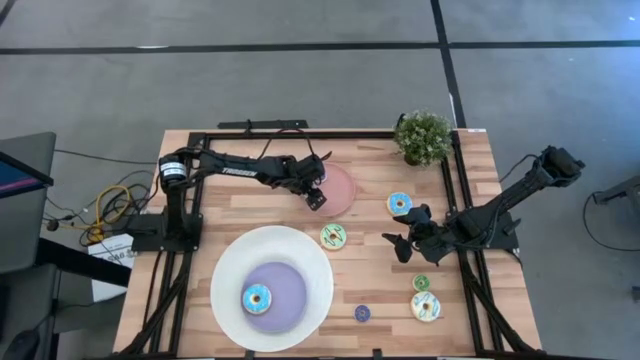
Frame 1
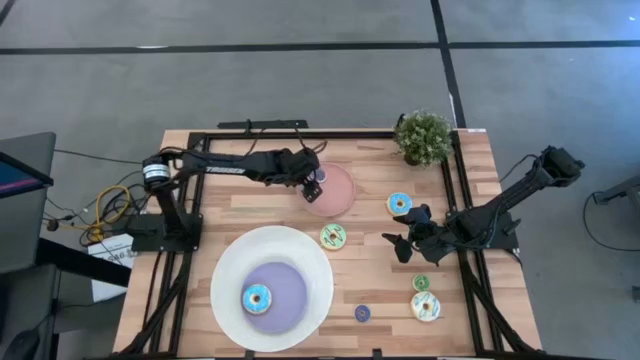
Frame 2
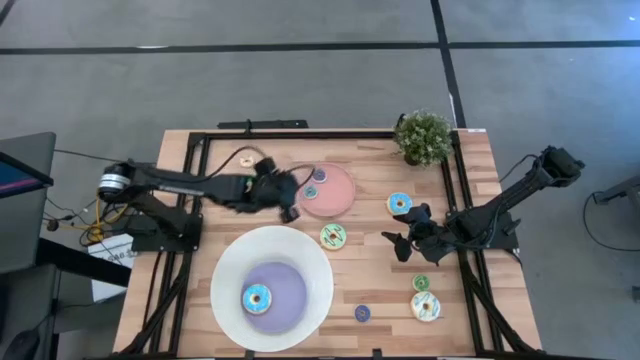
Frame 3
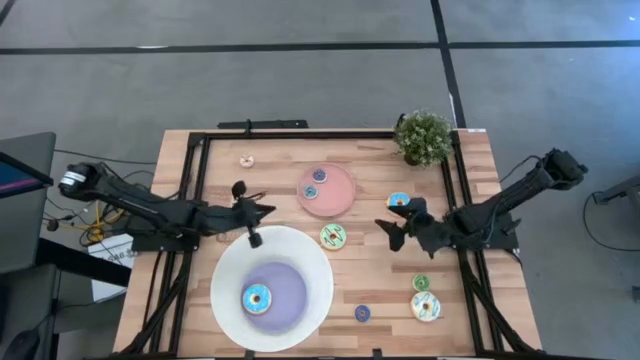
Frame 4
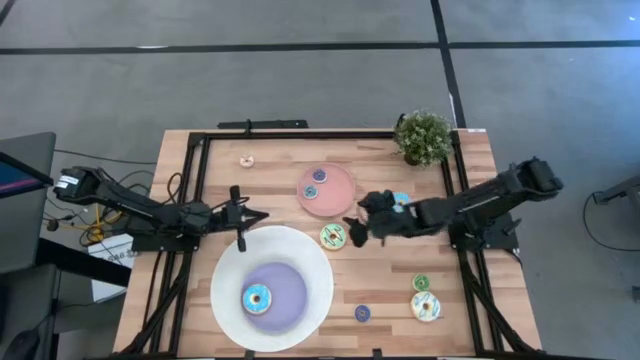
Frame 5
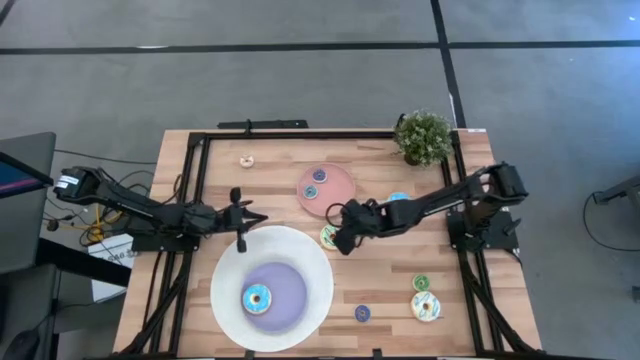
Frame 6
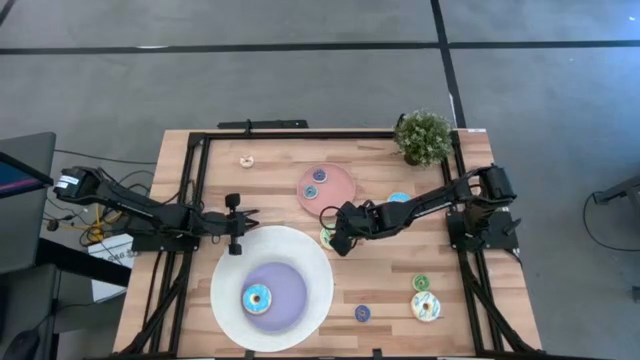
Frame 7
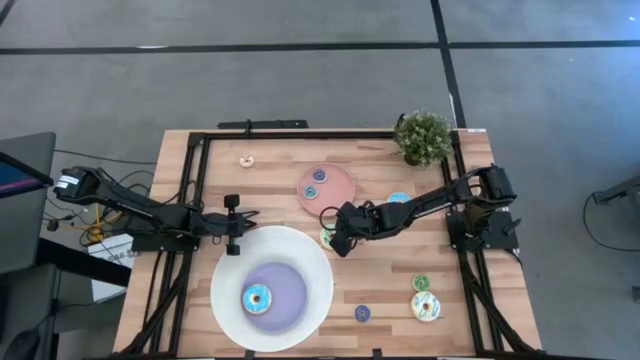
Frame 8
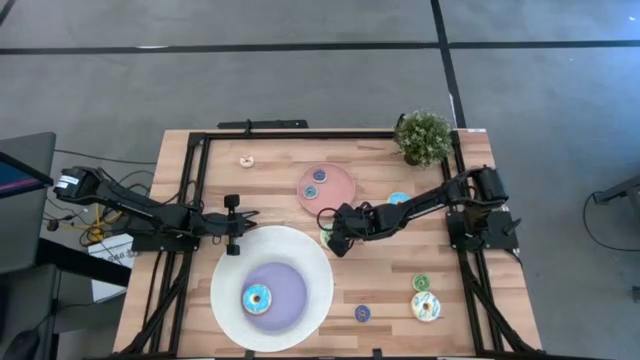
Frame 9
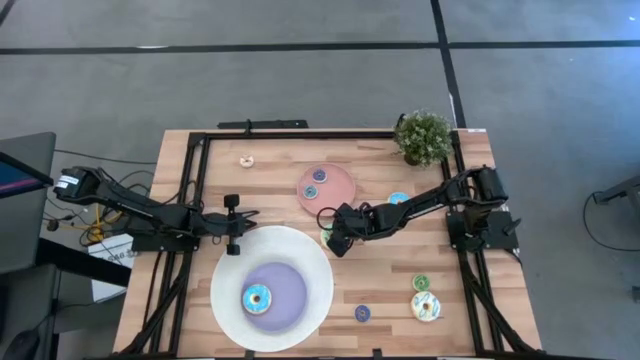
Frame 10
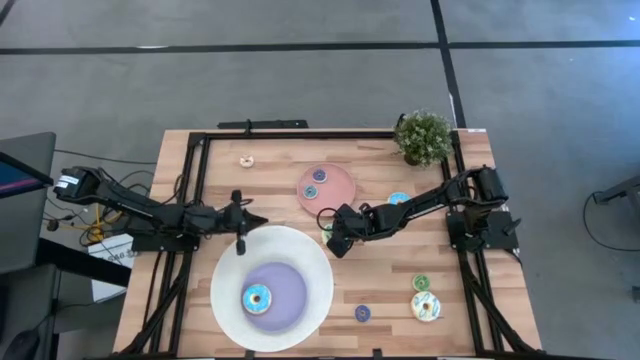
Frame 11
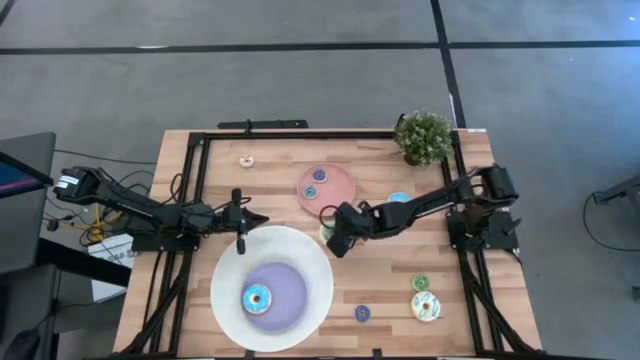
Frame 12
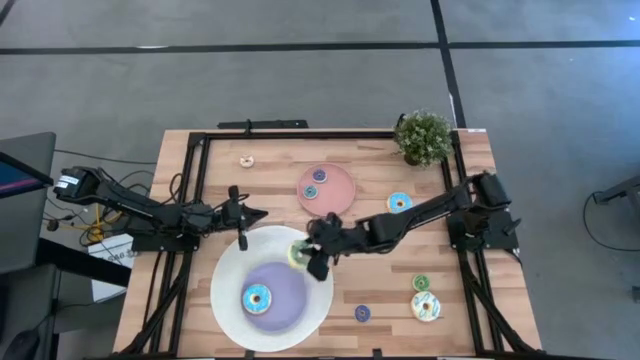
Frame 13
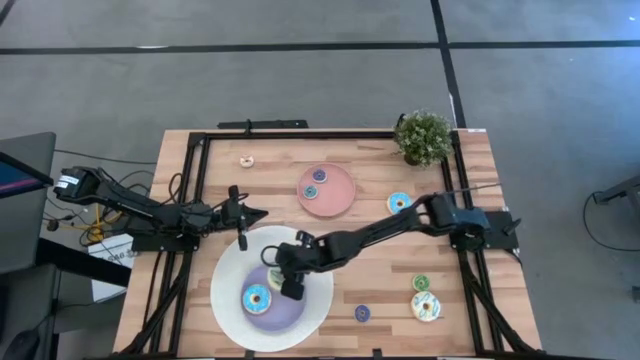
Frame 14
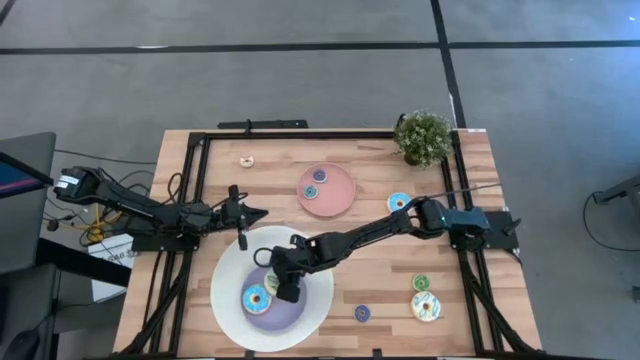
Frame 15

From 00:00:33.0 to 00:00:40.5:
Task: Pick & Place donuts
Put the big light green donut on the purple plate

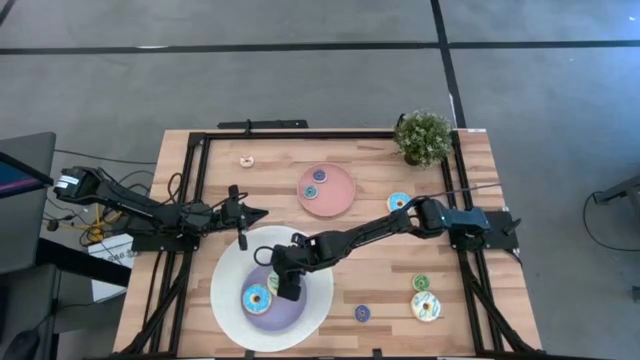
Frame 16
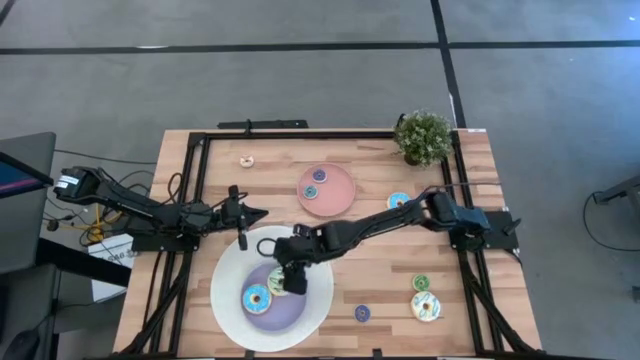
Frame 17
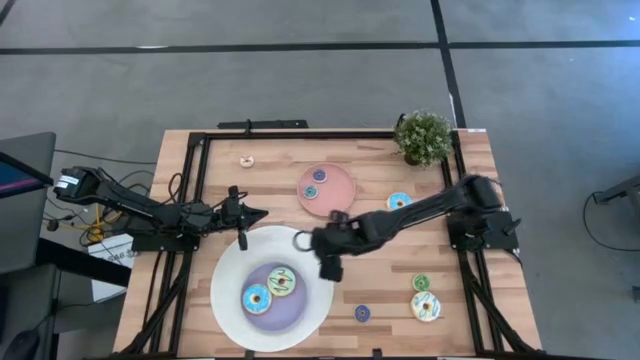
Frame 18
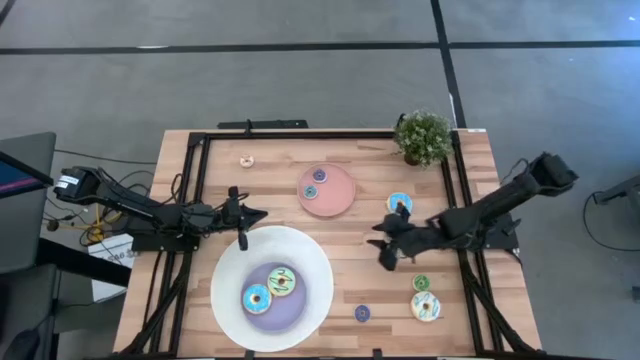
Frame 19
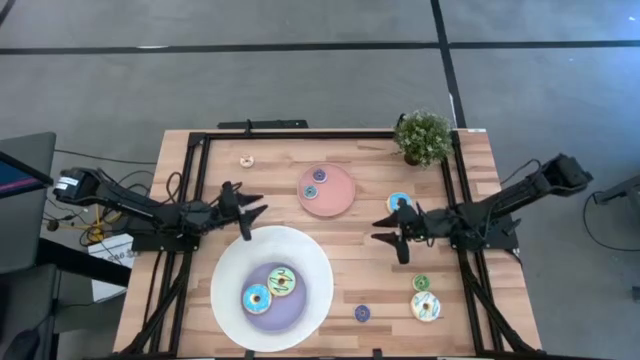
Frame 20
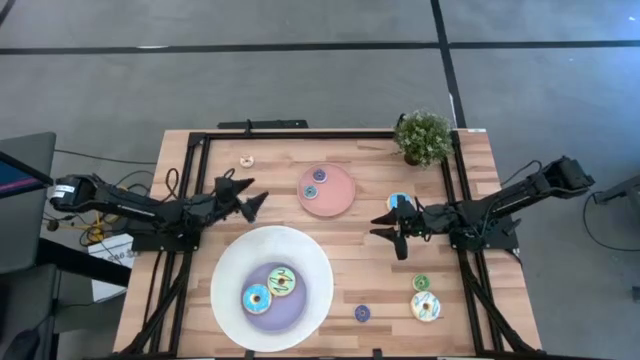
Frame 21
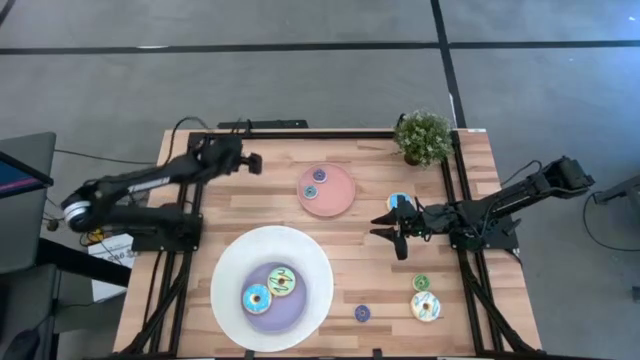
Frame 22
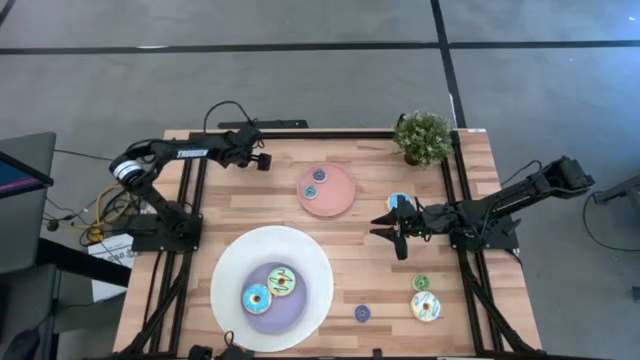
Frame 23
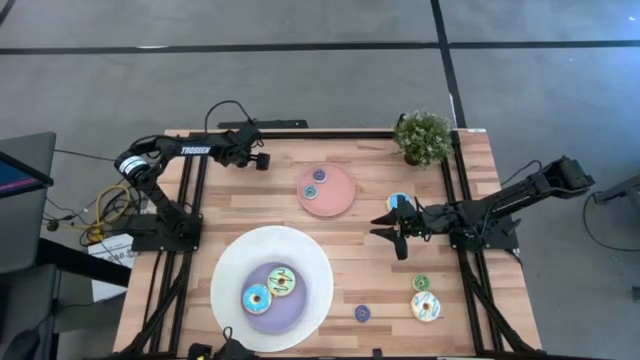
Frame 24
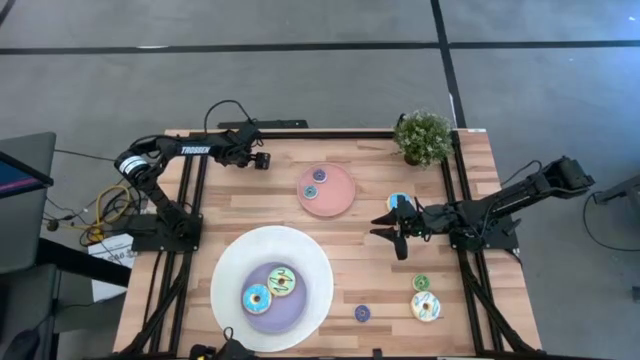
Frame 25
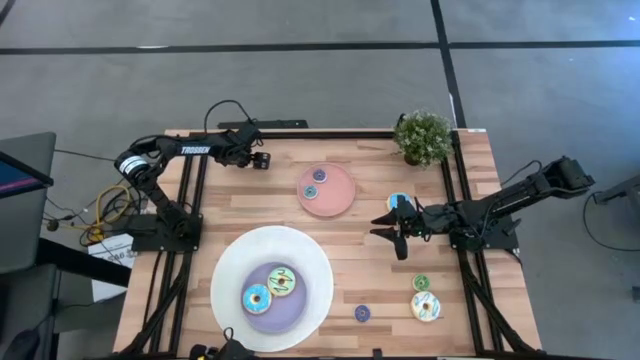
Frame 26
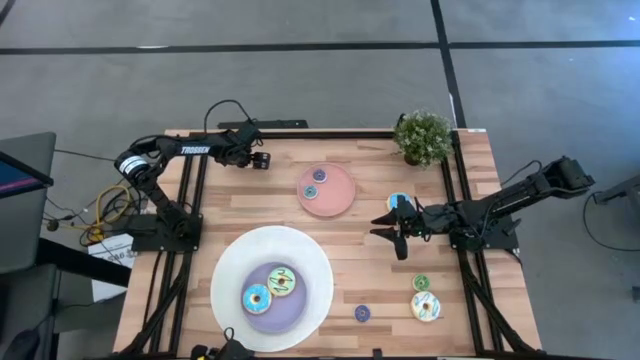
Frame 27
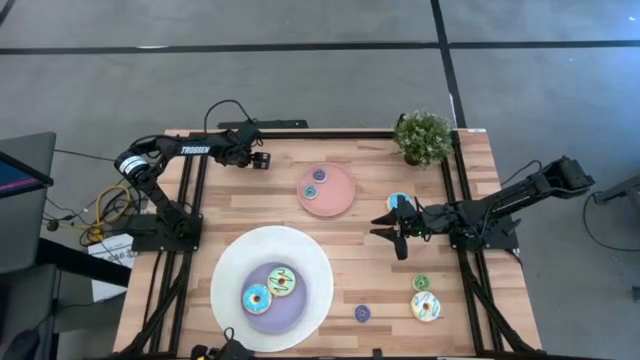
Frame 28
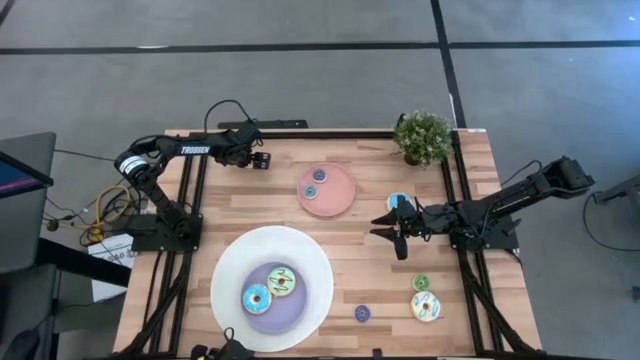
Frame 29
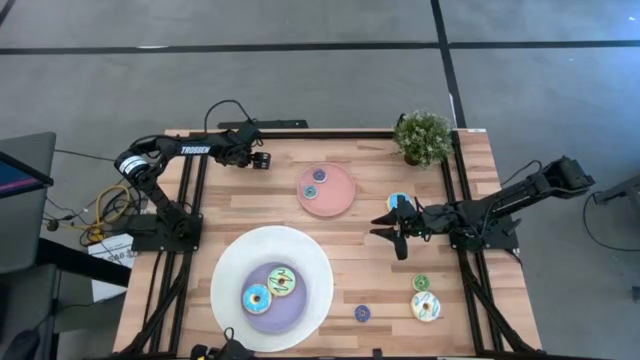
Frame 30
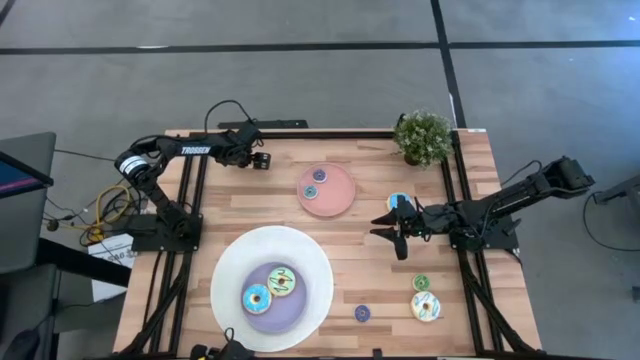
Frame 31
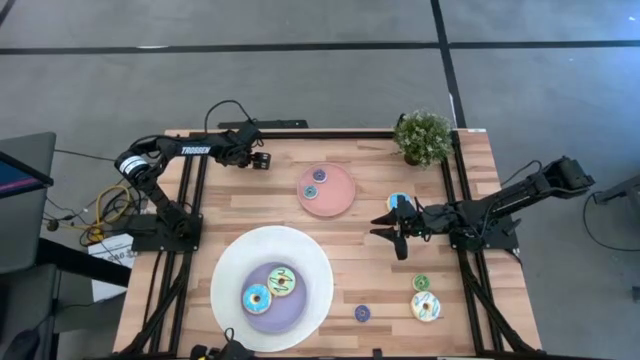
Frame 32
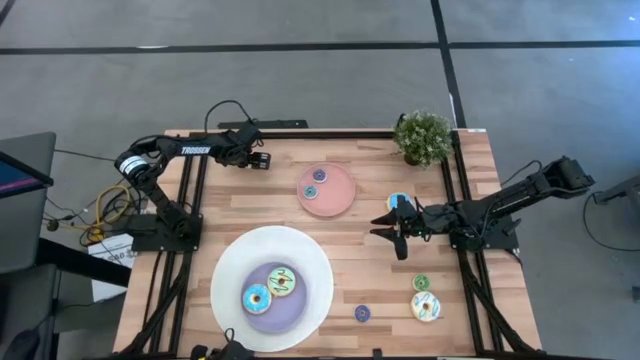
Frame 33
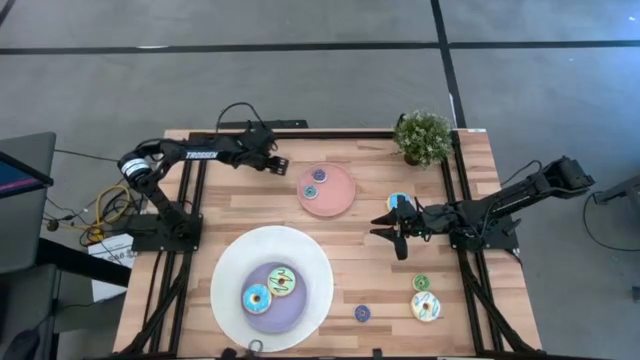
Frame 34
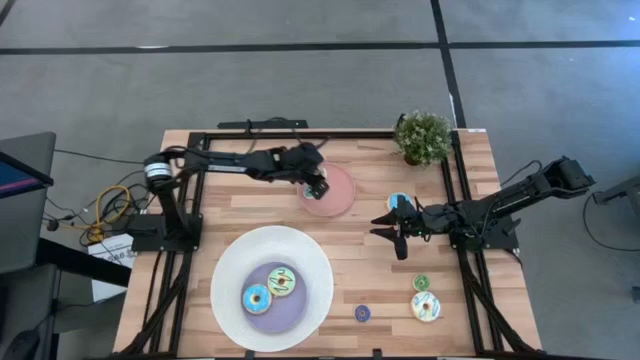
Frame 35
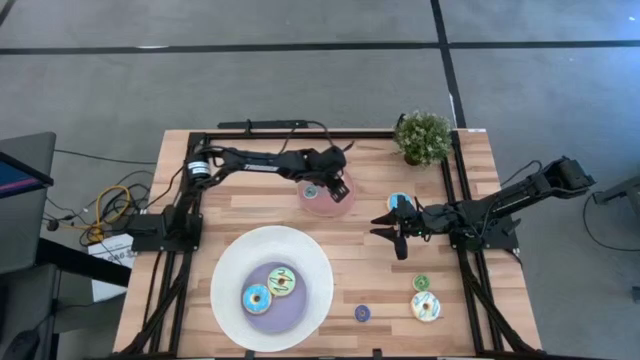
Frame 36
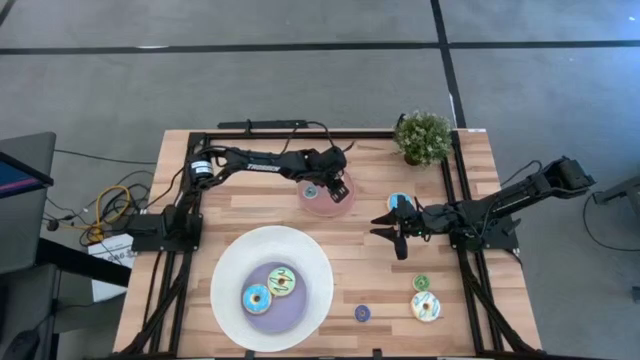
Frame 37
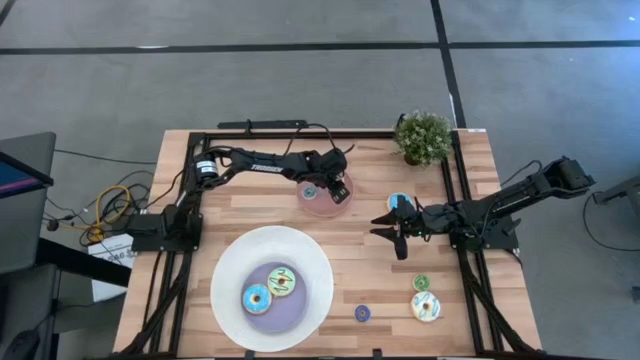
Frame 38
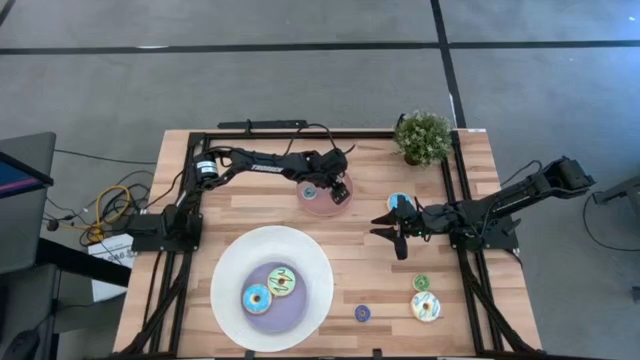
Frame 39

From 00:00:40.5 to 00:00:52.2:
Put the small white donut on the pink plate

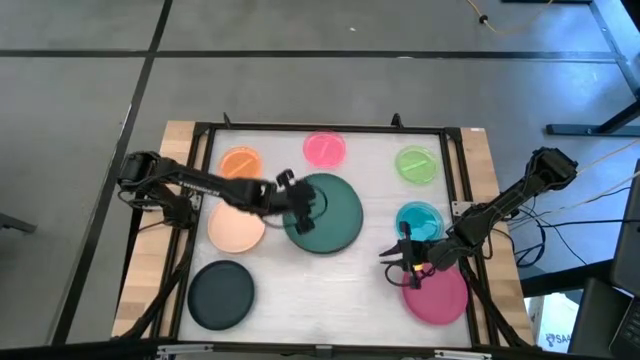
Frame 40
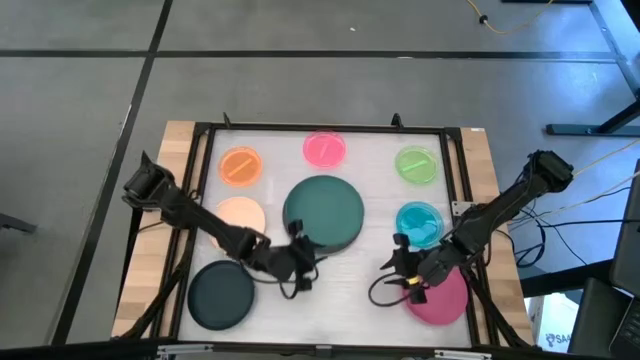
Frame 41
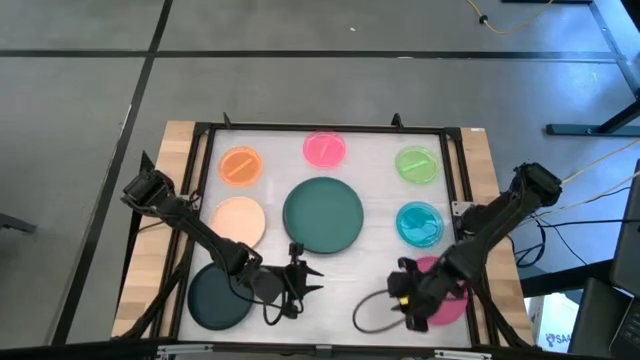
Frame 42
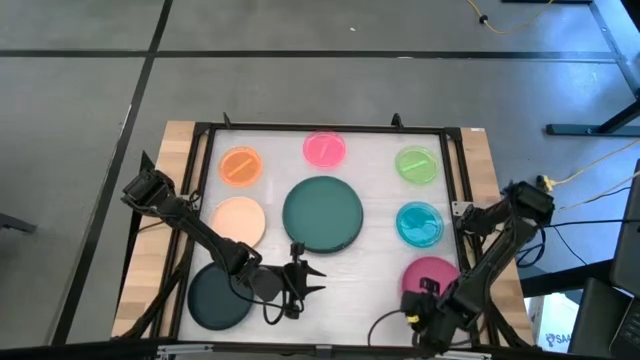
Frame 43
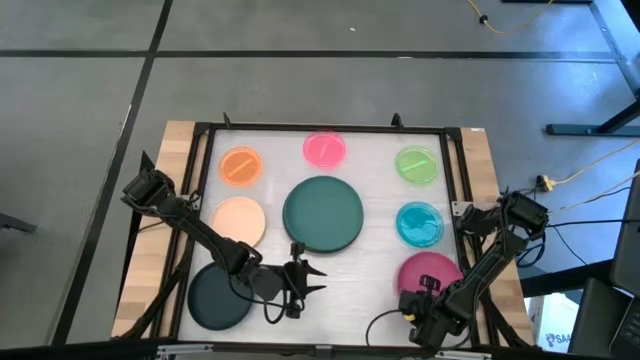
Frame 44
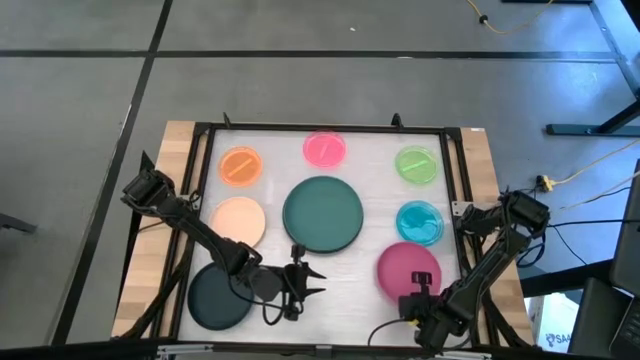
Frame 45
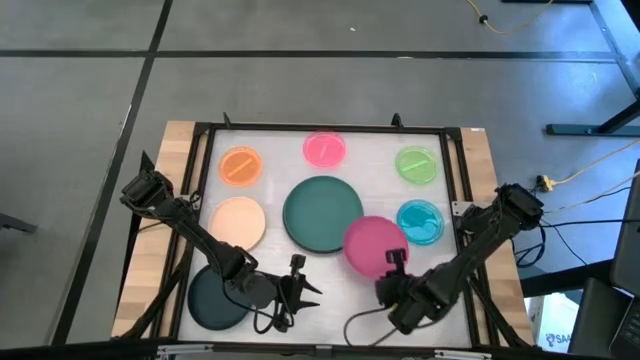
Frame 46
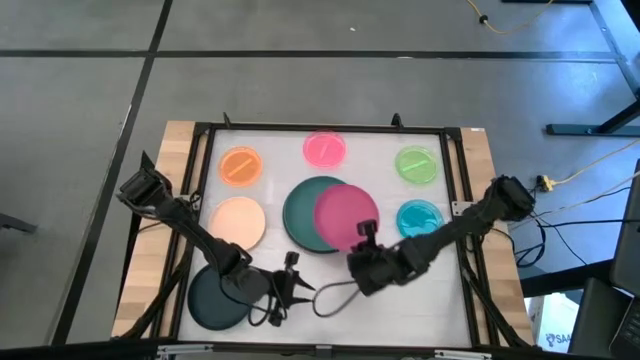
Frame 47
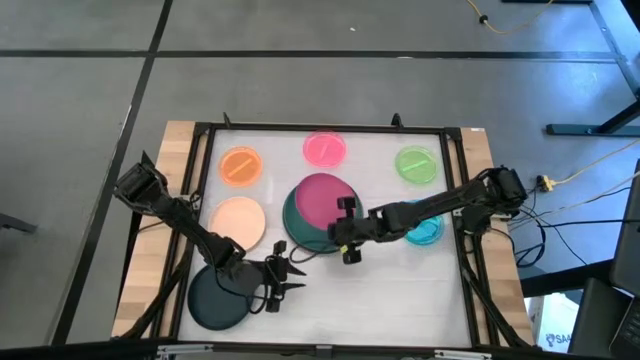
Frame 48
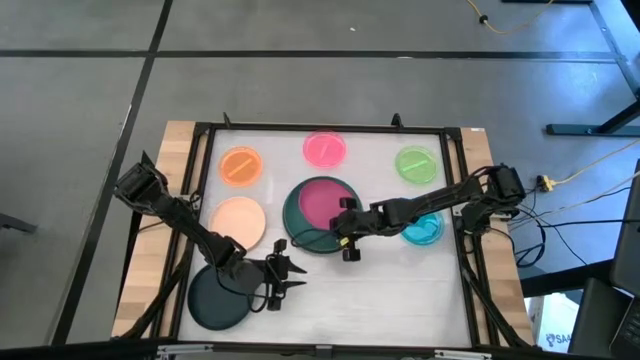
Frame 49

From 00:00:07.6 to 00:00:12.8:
Task: Stack plastic plates
Stack the medium pink plate on top of the big green plate
